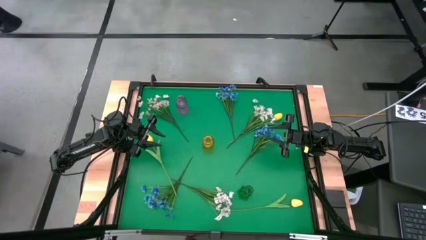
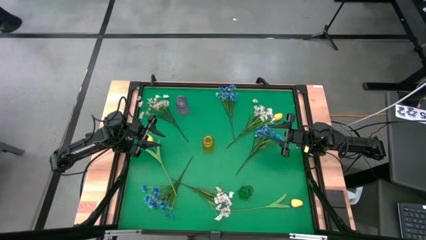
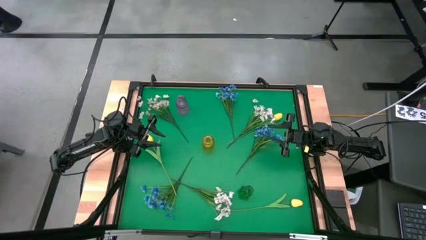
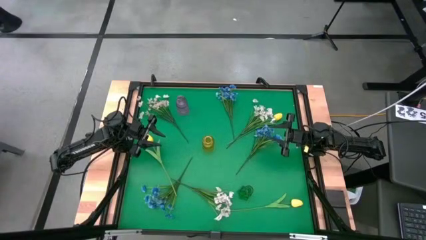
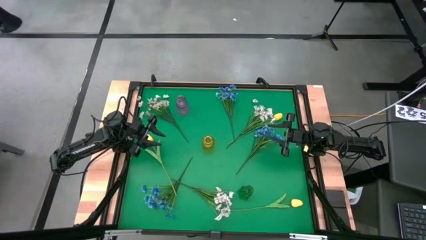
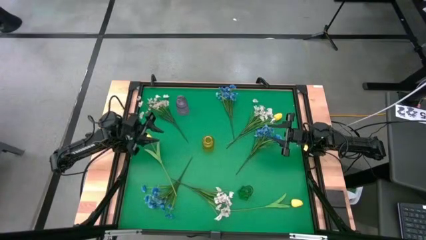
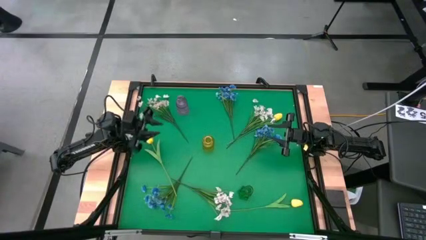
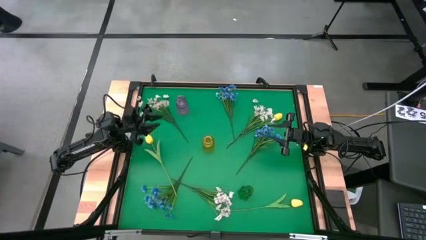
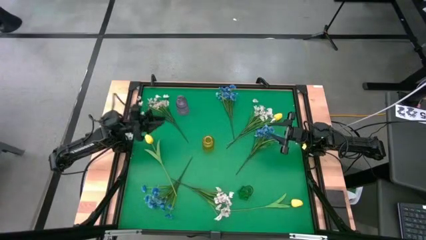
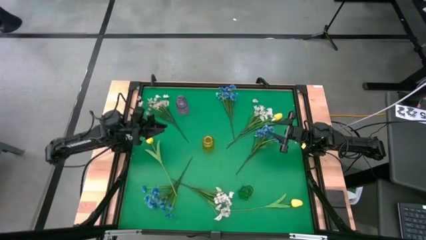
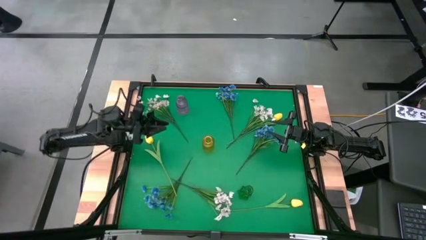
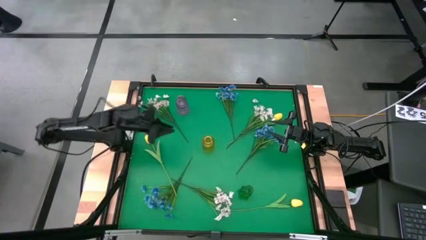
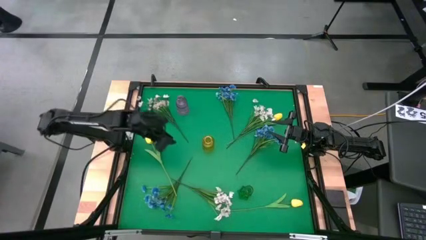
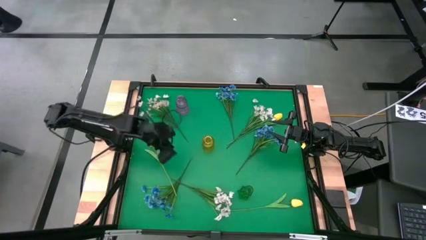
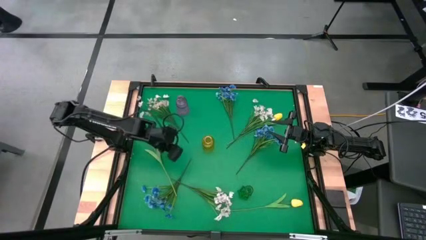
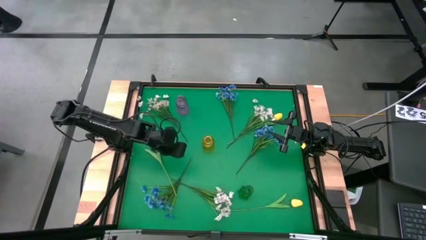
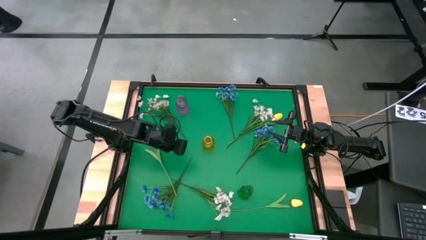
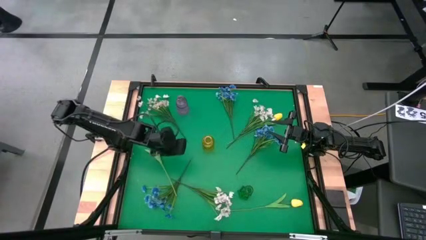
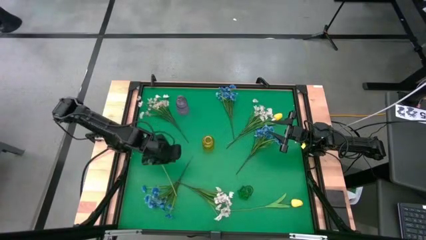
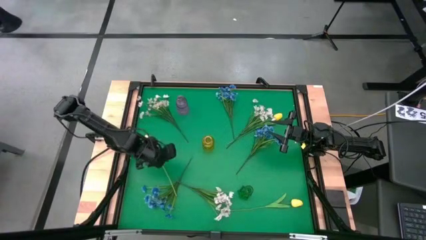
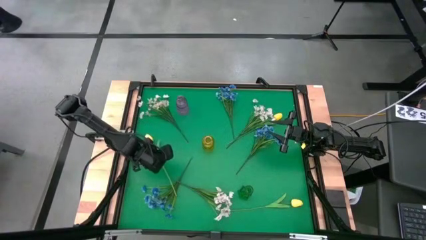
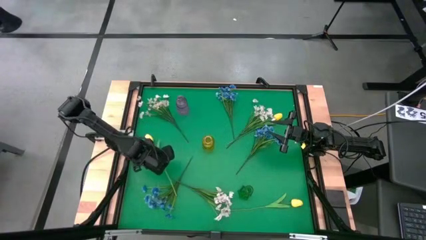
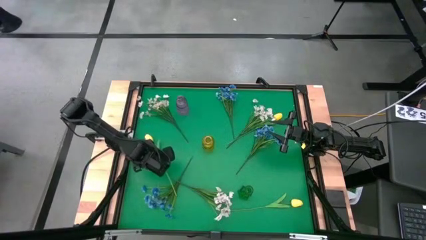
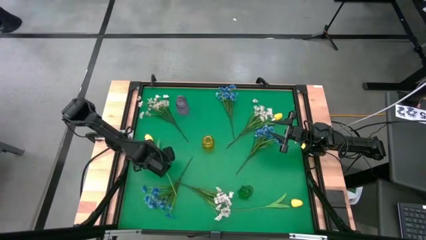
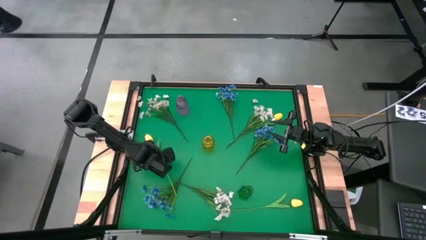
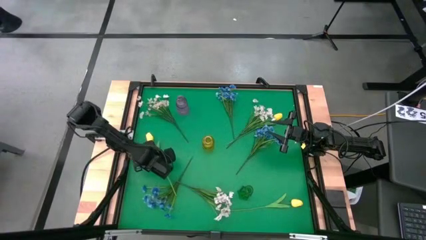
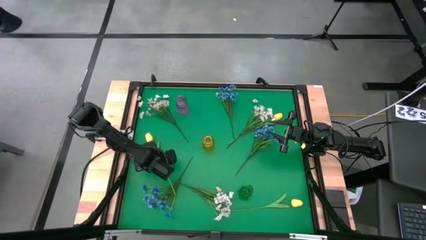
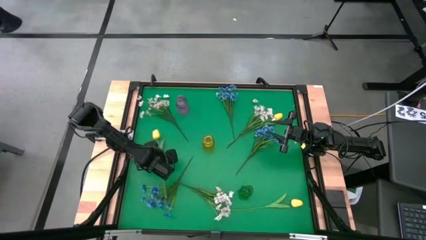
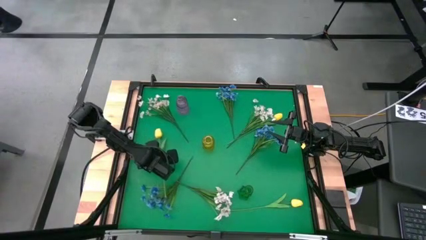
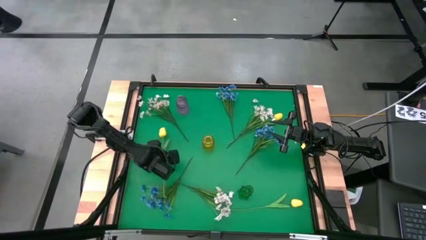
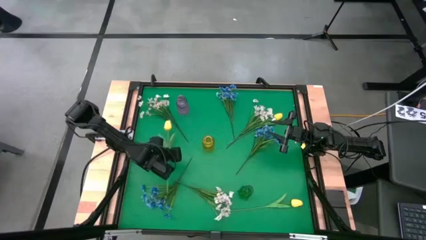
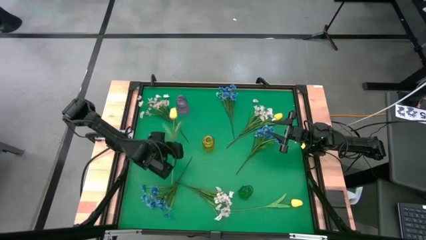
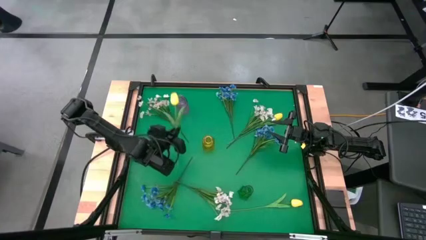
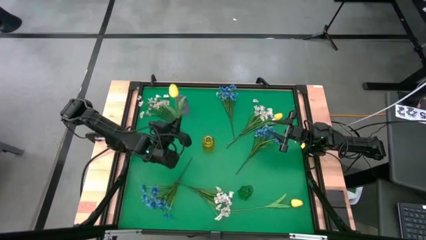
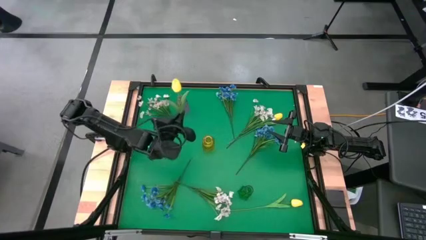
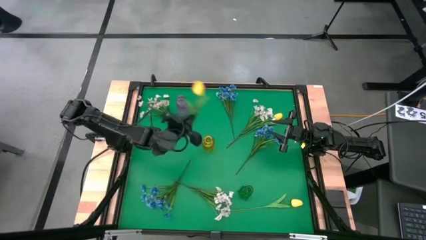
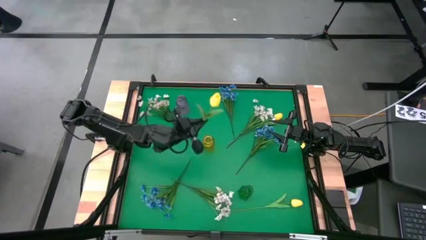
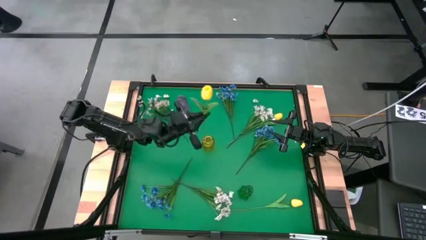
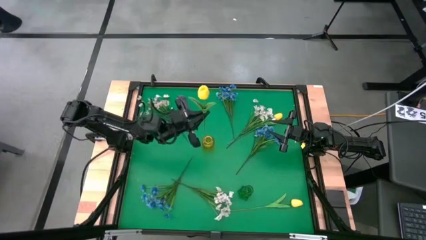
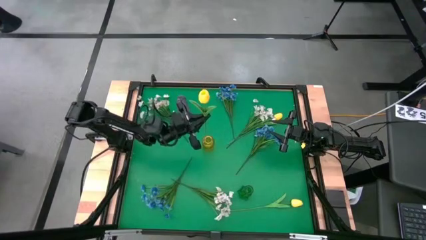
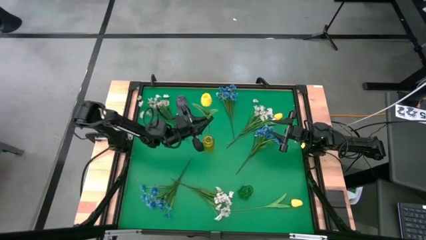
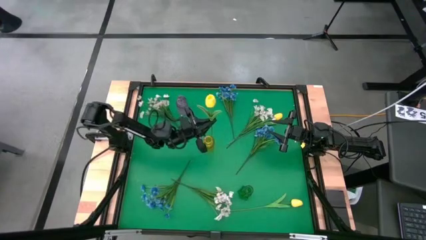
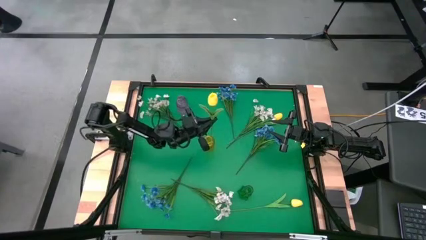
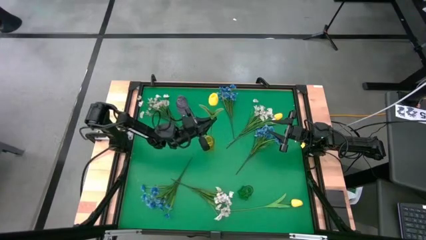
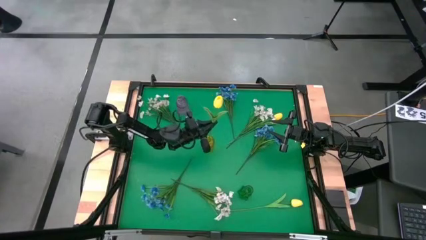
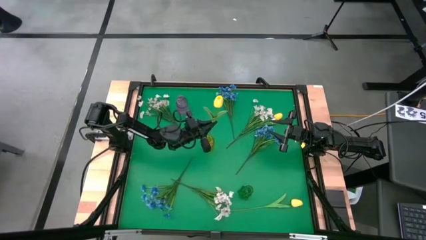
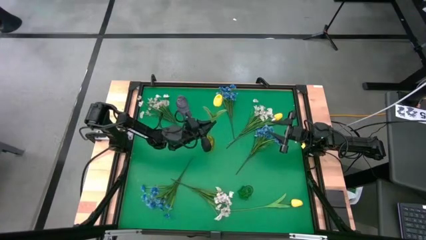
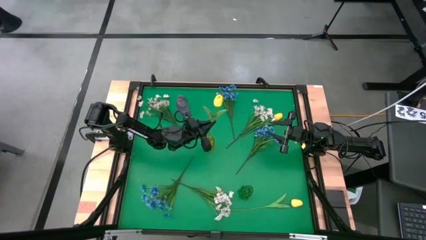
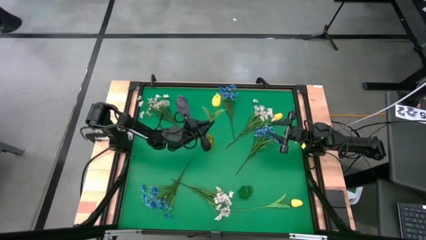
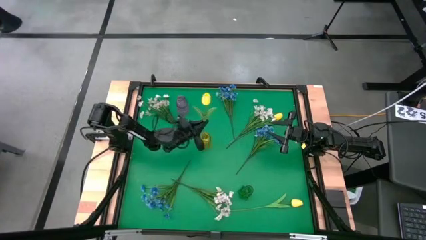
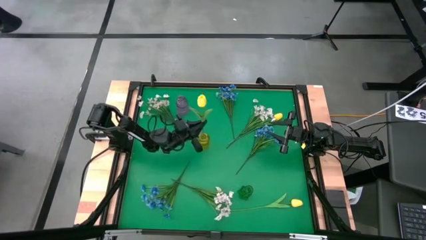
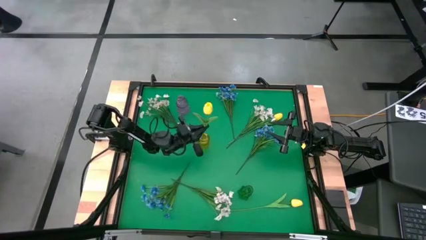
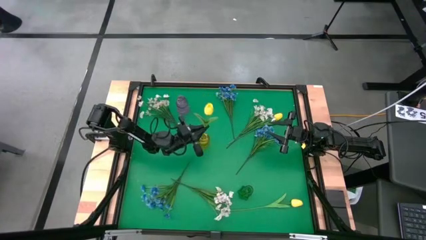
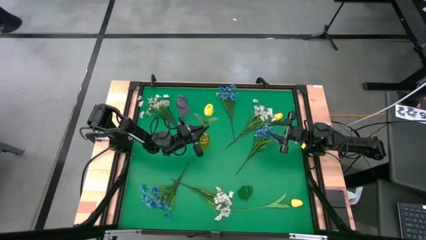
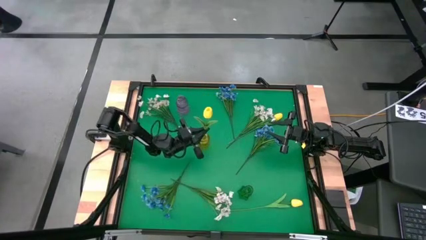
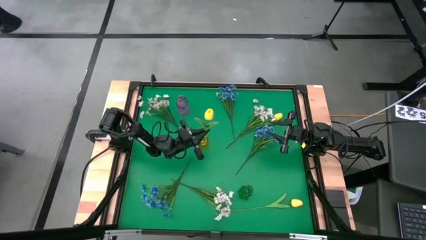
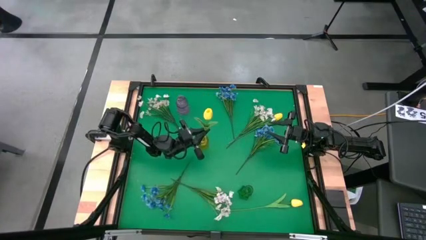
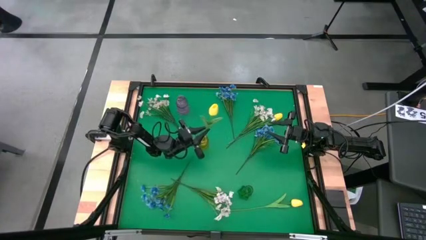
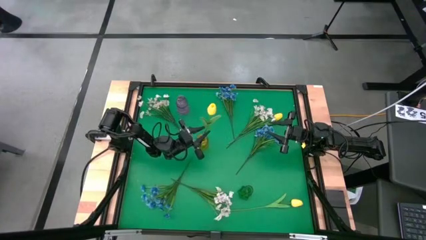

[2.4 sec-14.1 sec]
Task: Sort flowers into vase by color
Put the middle left yellow flower into the yellow vase
